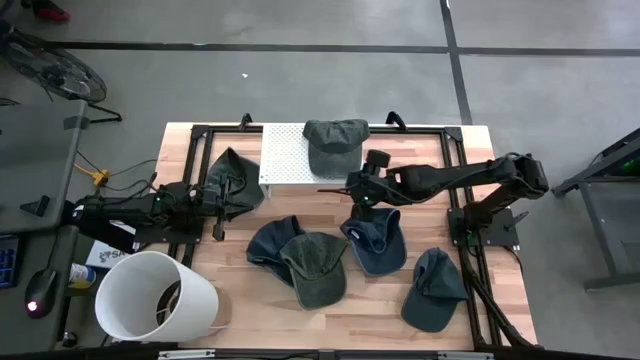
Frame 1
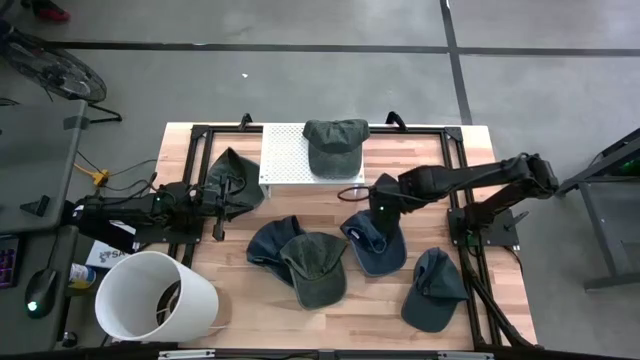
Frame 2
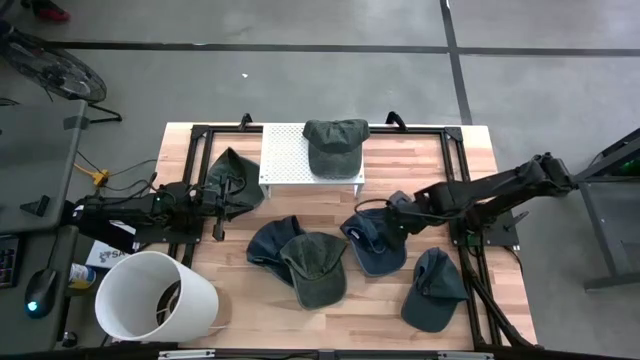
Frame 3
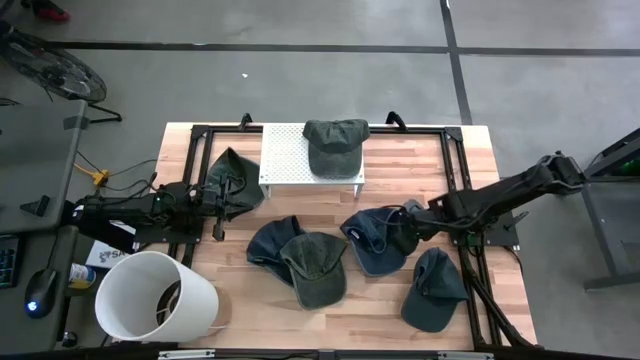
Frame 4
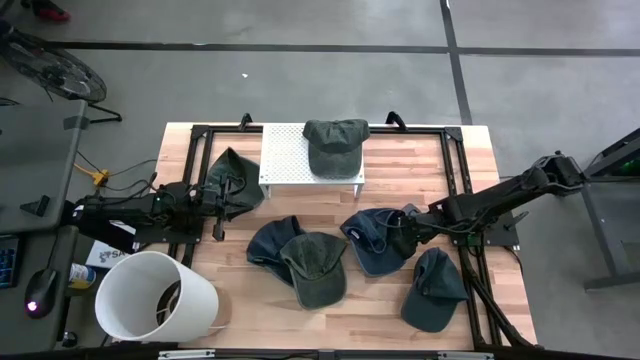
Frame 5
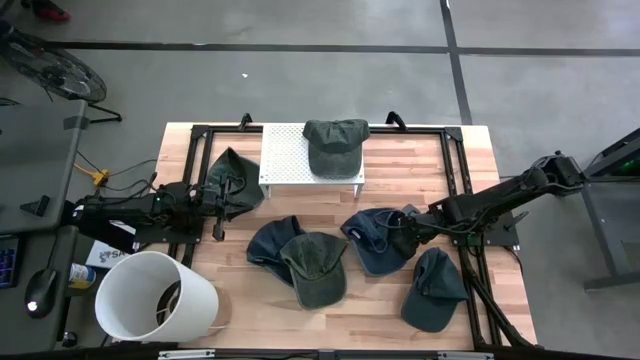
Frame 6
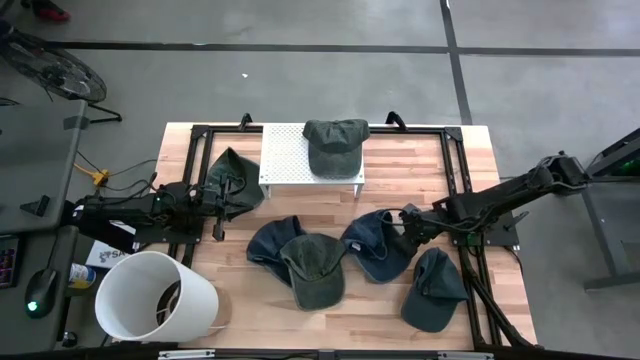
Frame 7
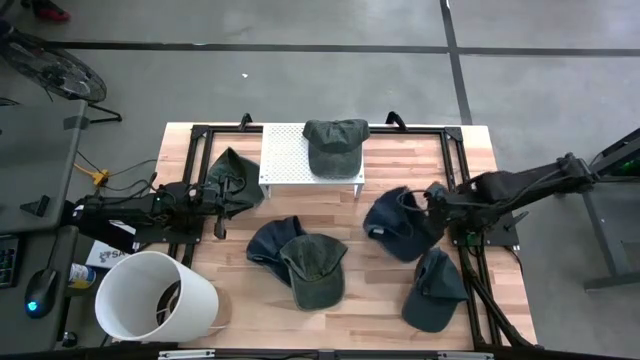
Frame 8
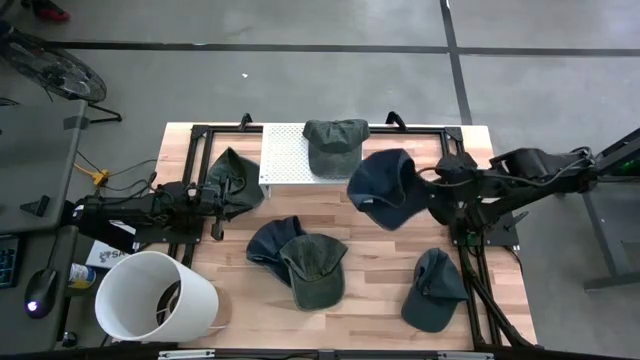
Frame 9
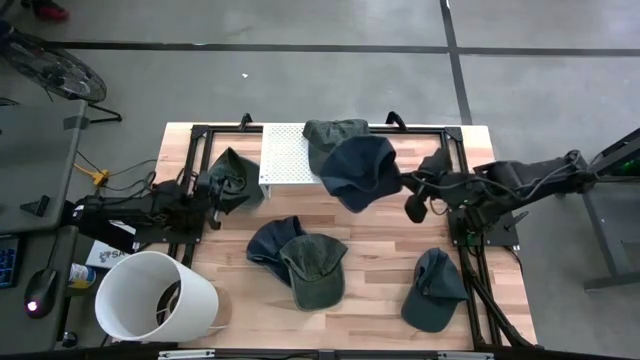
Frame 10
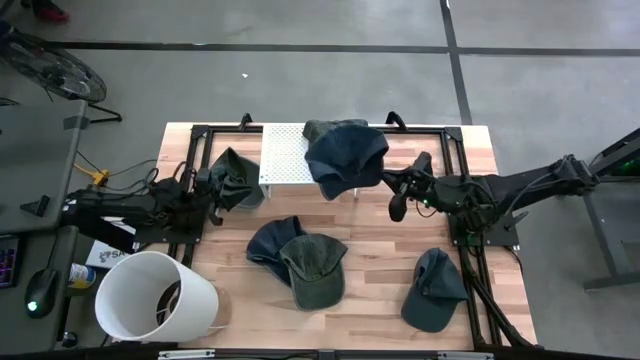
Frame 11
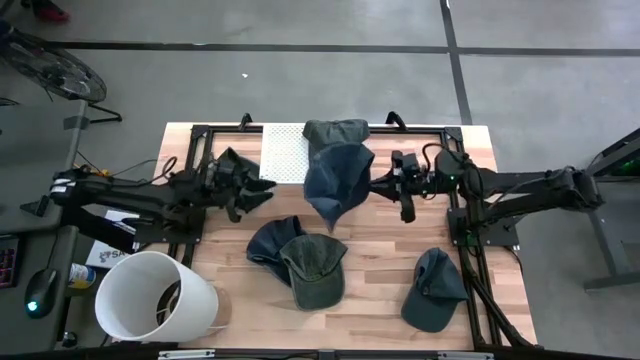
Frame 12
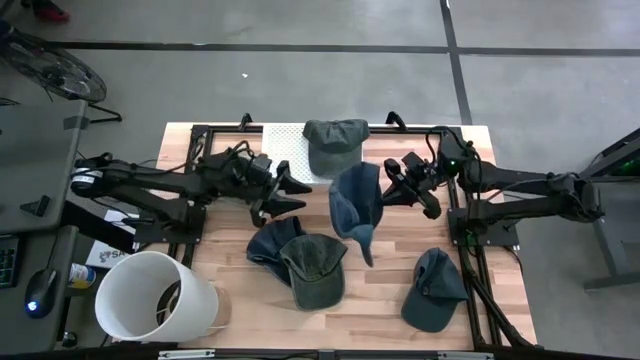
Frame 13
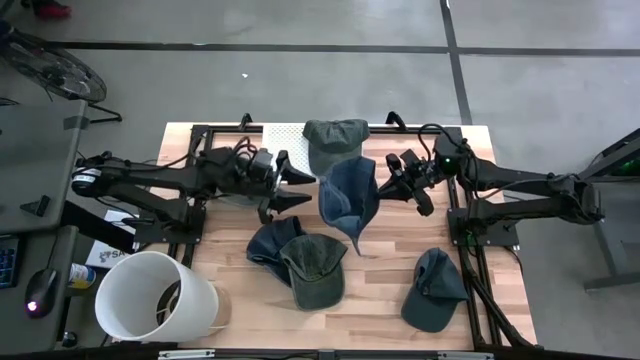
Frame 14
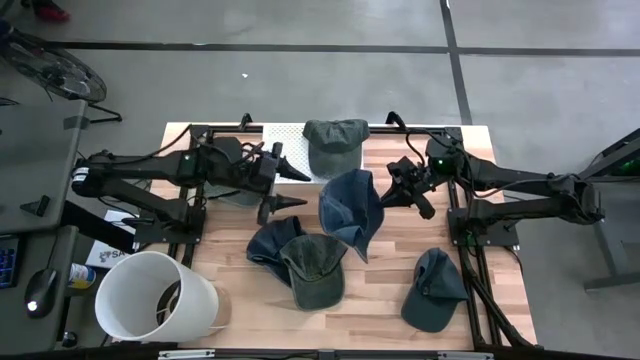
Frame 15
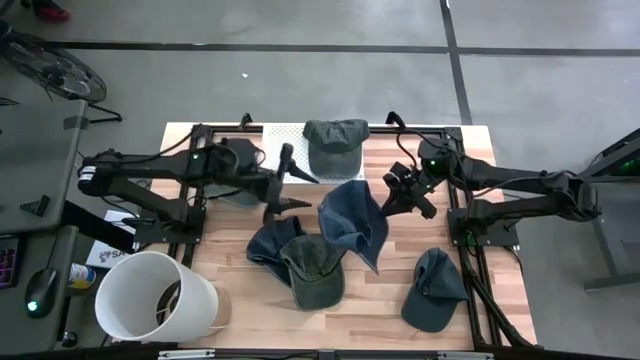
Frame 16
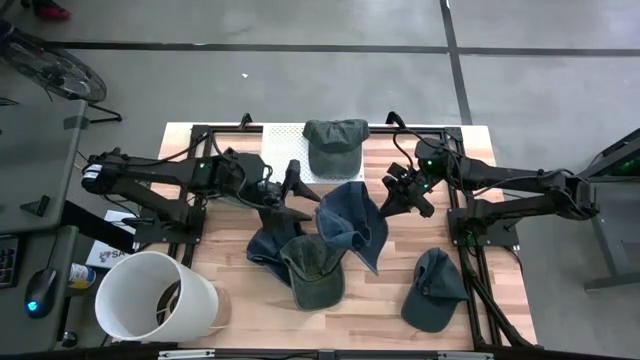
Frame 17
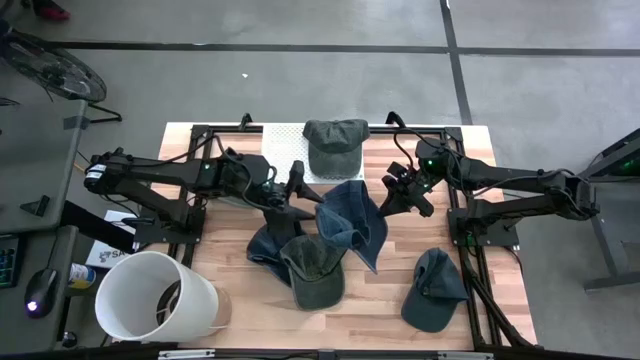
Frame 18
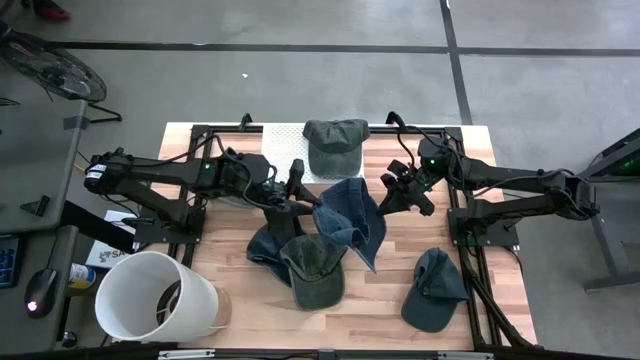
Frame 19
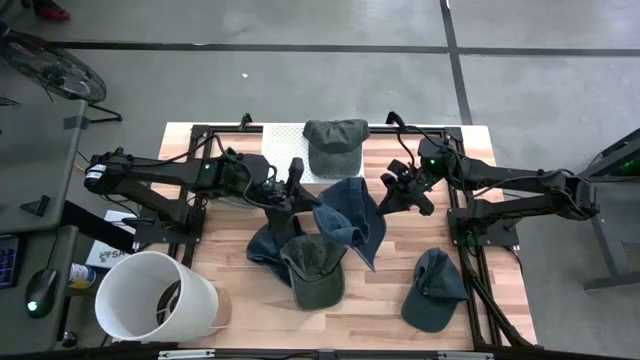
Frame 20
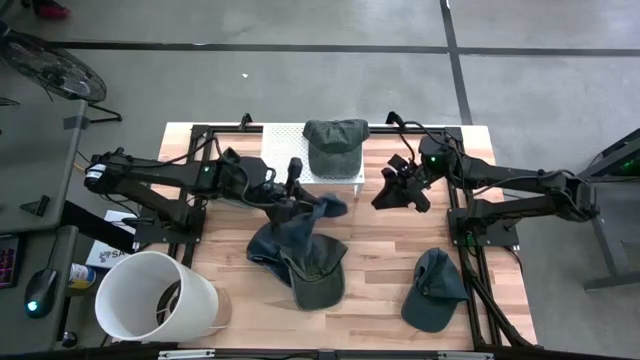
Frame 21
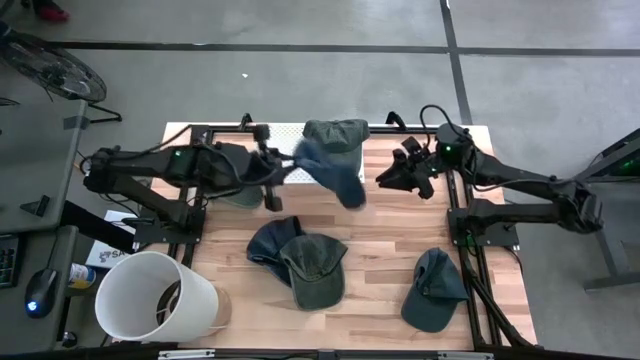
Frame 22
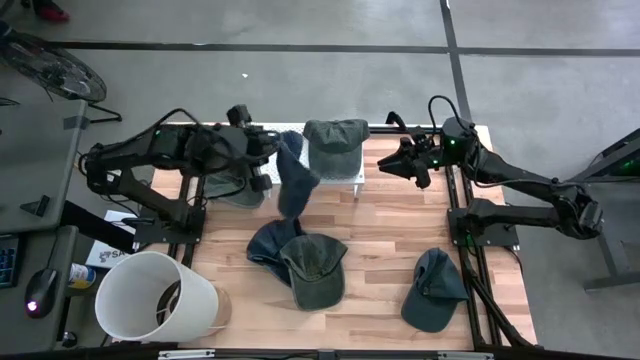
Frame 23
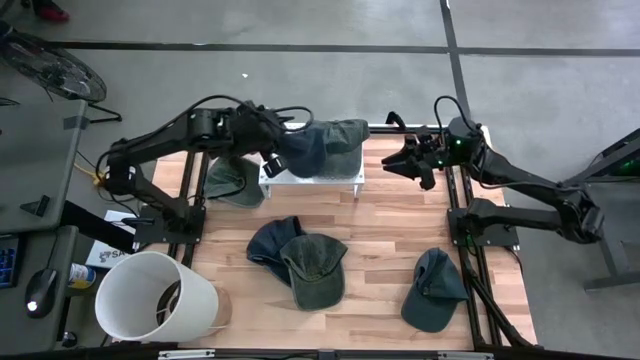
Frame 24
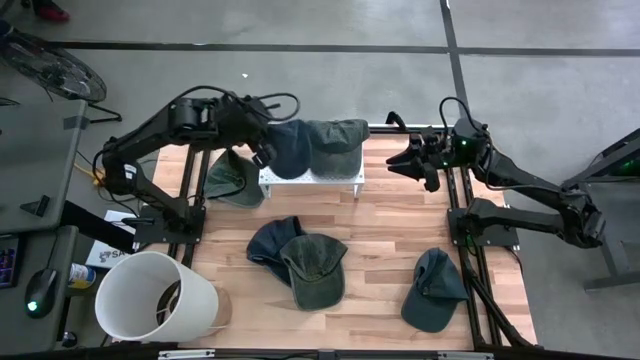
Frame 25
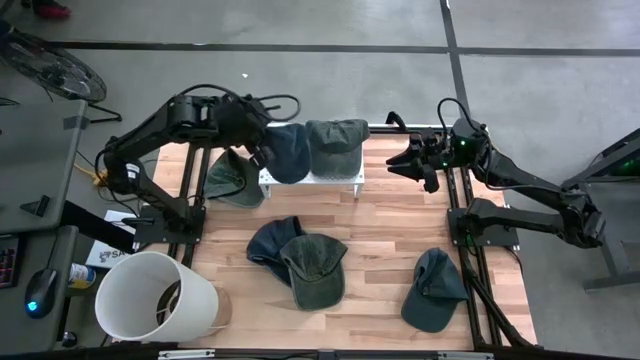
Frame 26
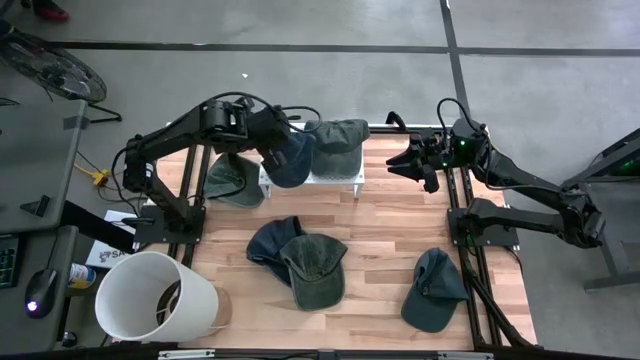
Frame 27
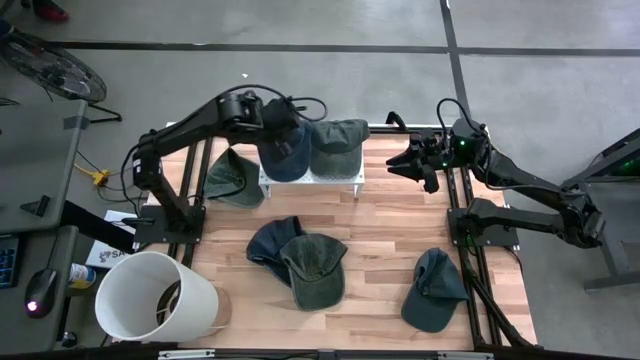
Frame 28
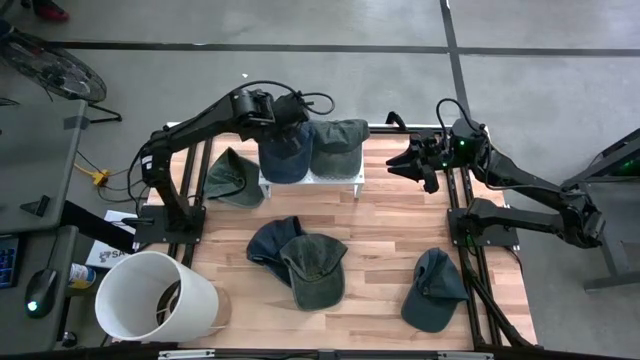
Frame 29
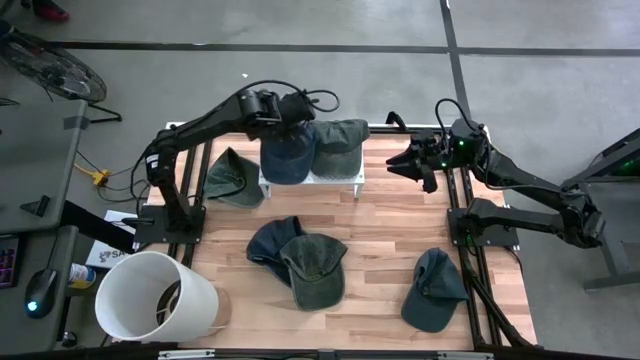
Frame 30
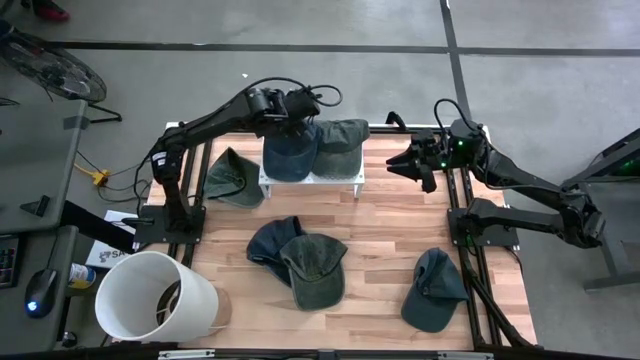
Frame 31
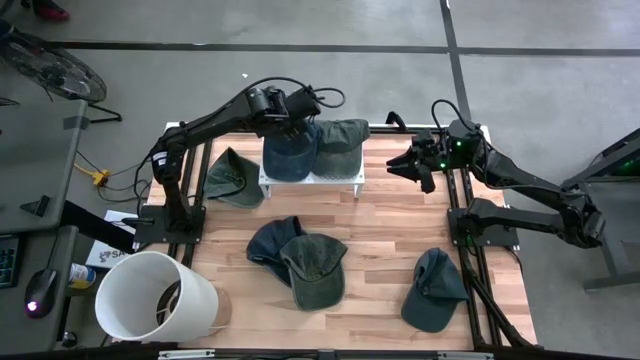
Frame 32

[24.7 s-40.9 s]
Task: Pick & Place hat
Put the top right blue cap on the shelf
